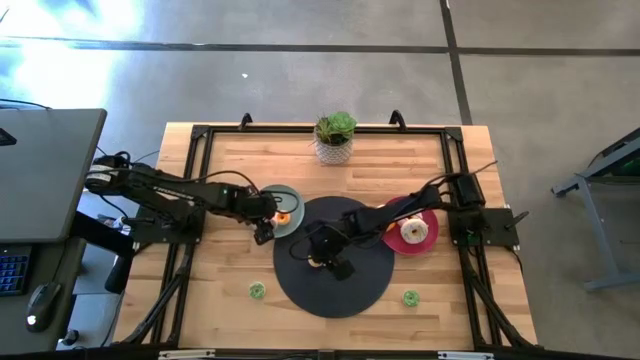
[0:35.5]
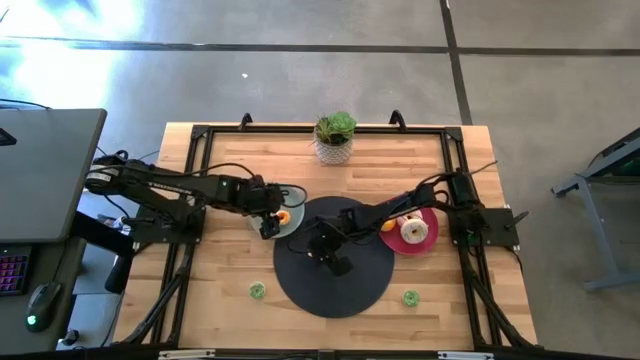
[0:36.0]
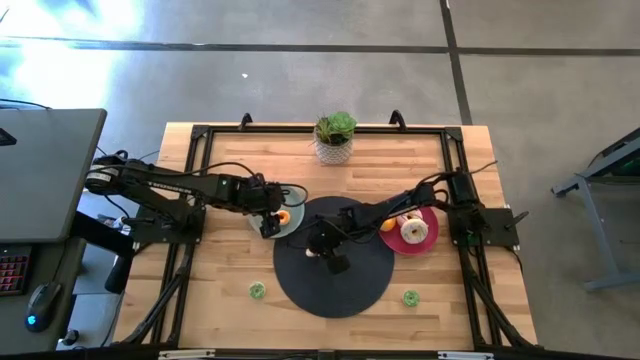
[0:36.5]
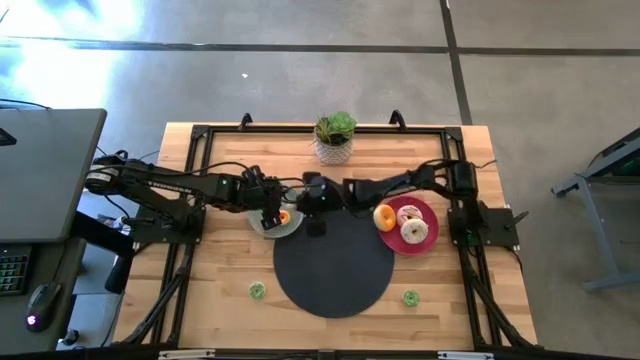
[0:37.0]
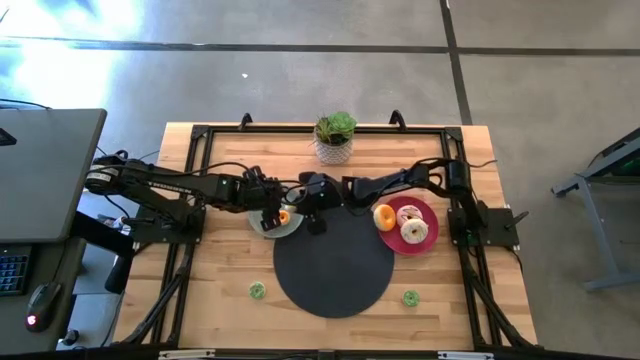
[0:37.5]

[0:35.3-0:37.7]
Task: Pick & Place donuts
Put the small yellow donut on the blue plate

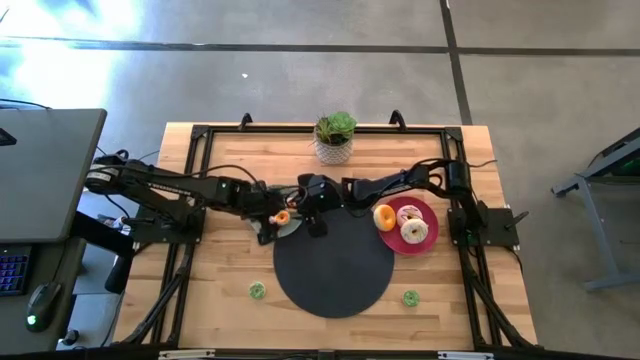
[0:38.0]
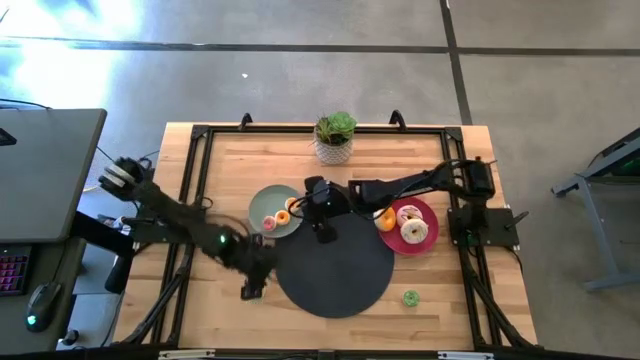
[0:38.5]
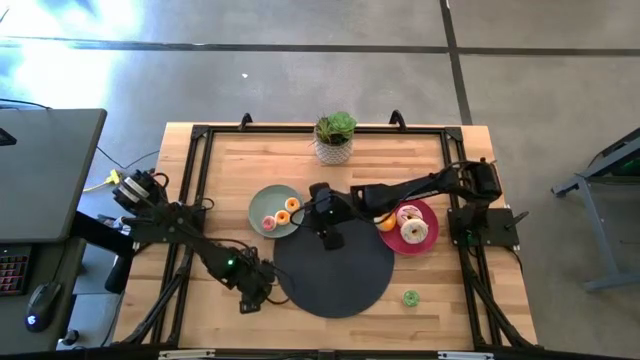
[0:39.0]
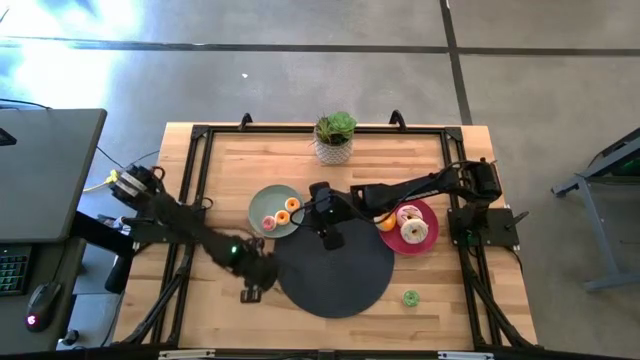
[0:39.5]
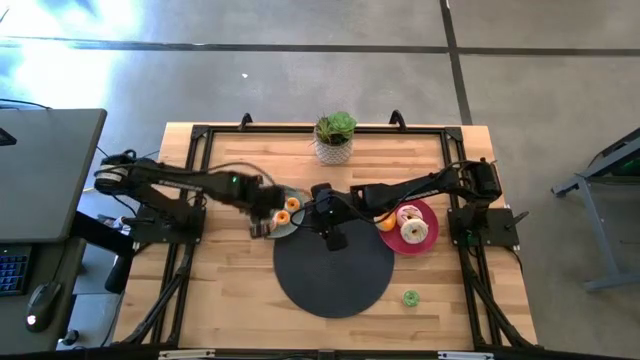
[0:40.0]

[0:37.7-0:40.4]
Put the left small green donut on the blue plate

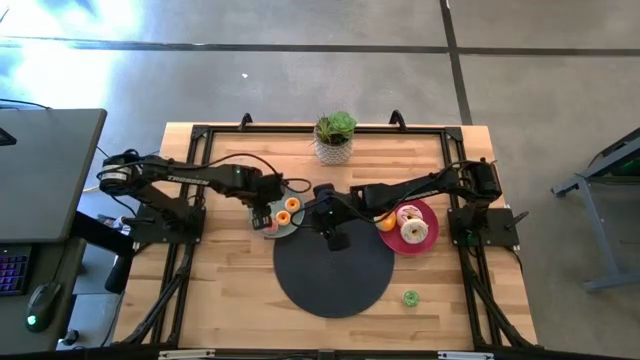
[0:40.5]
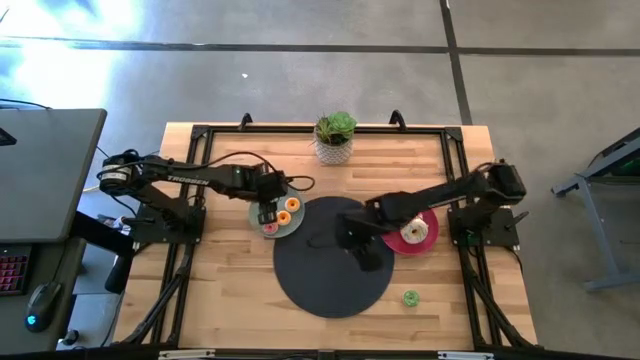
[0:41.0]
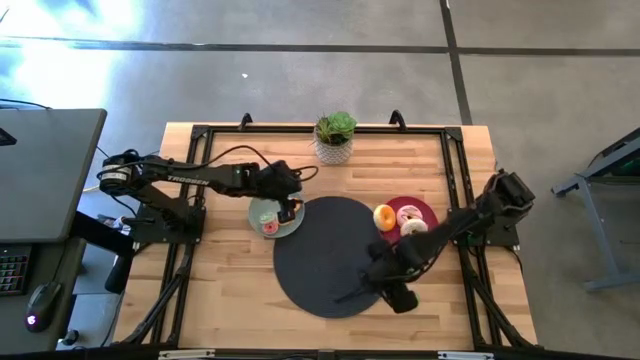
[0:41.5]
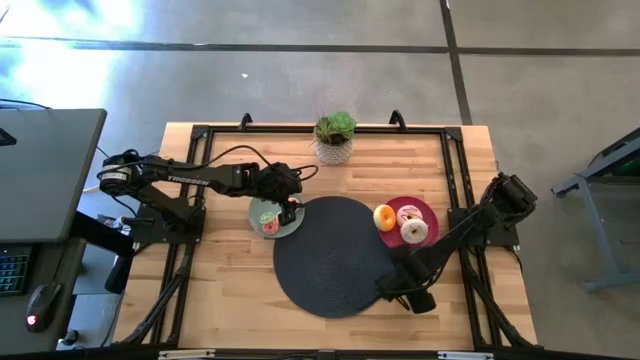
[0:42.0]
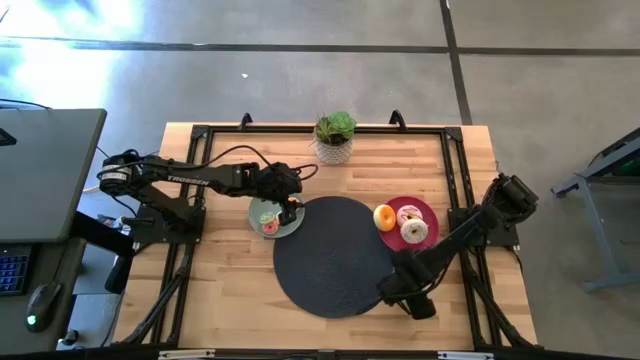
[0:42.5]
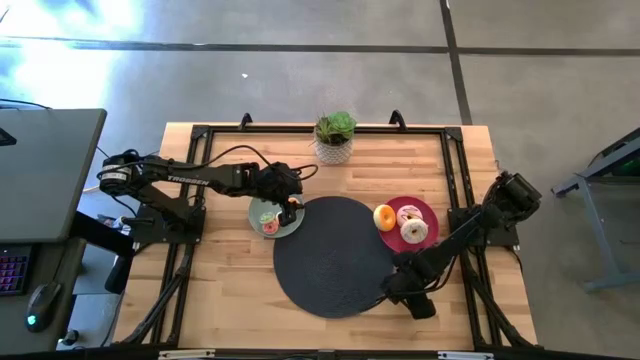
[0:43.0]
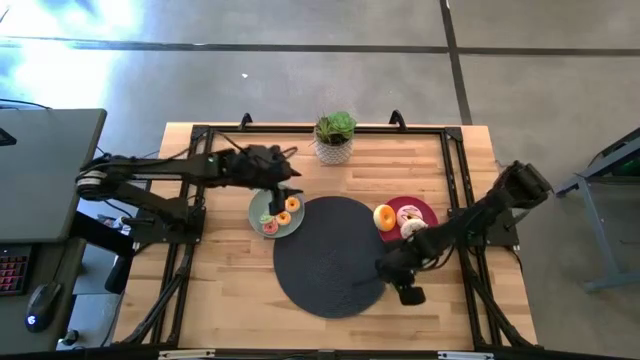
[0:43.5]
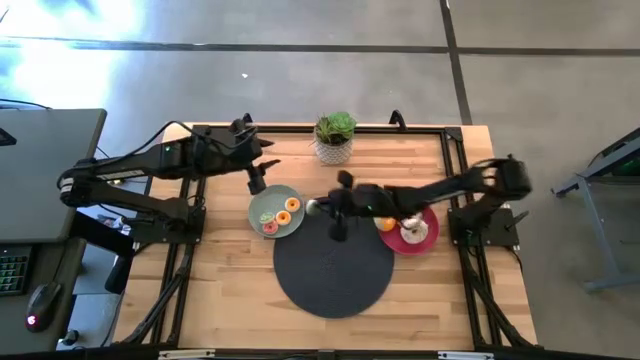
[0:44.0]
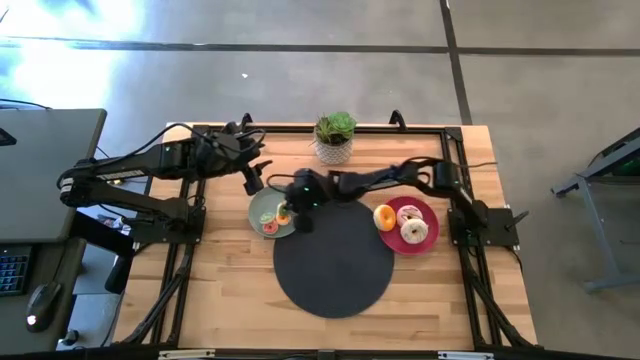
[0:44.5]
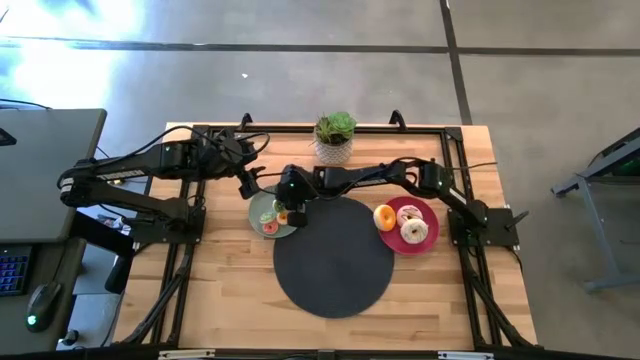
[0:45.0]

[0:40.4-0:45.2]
Put the small green donut on the blue plate

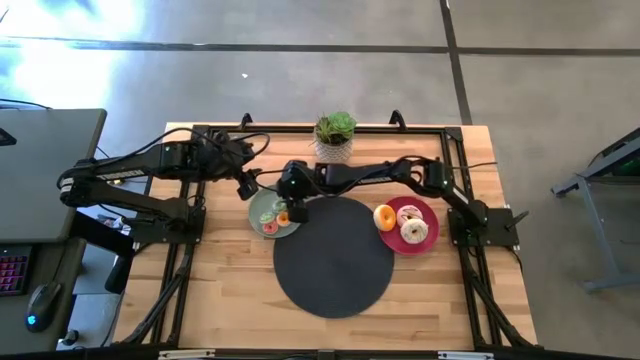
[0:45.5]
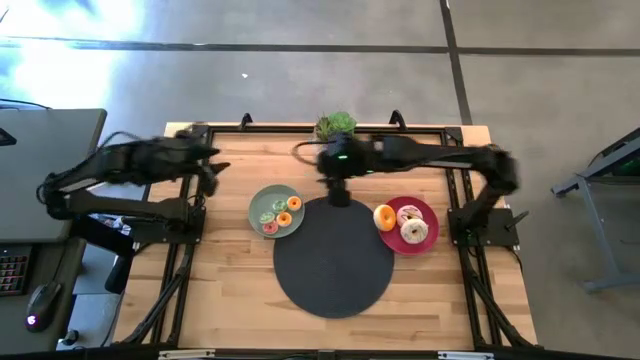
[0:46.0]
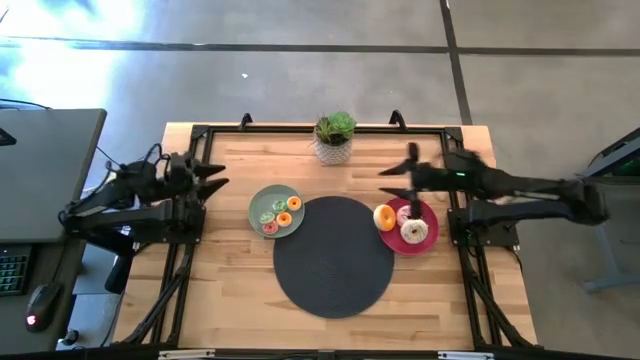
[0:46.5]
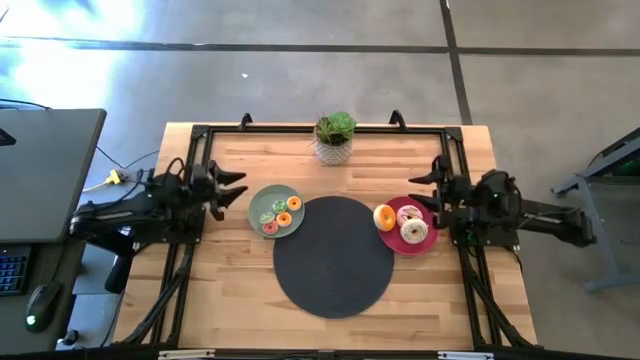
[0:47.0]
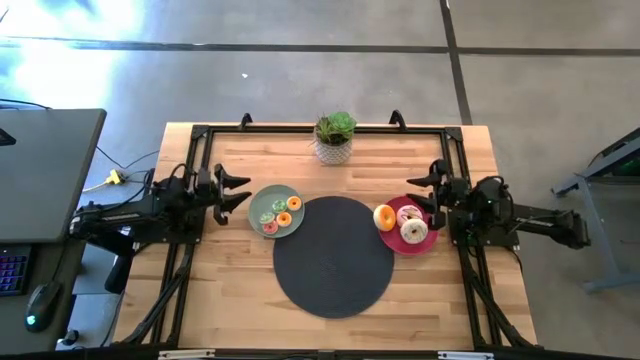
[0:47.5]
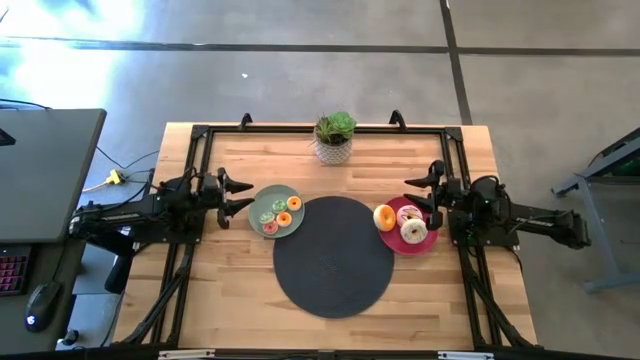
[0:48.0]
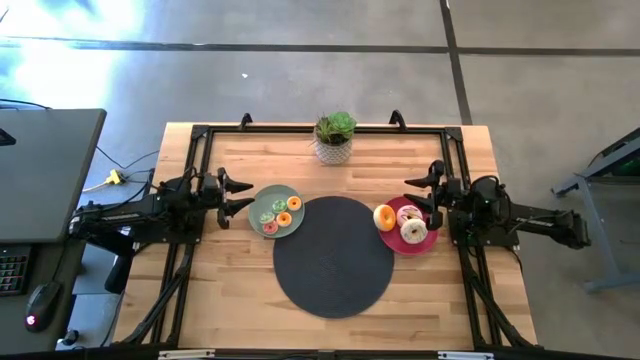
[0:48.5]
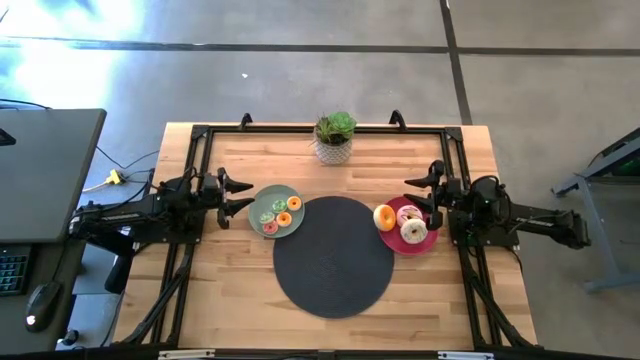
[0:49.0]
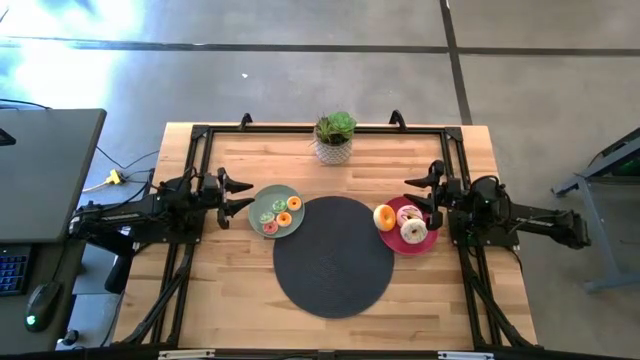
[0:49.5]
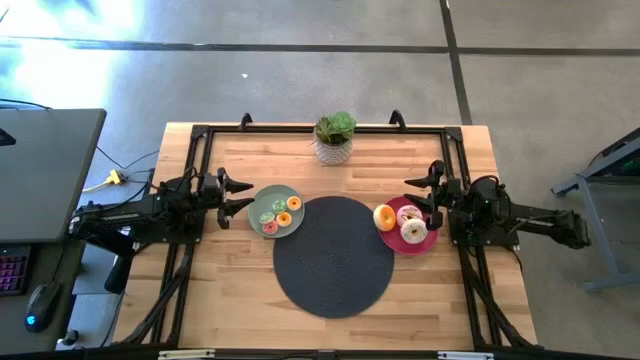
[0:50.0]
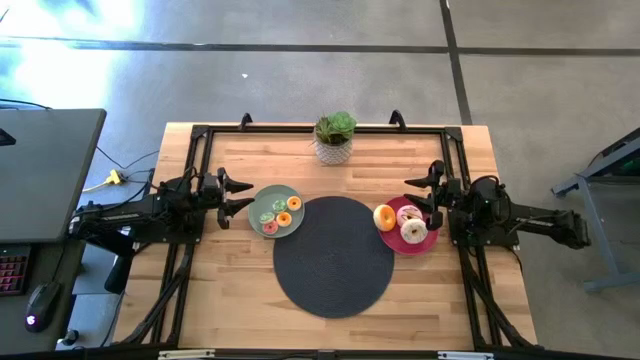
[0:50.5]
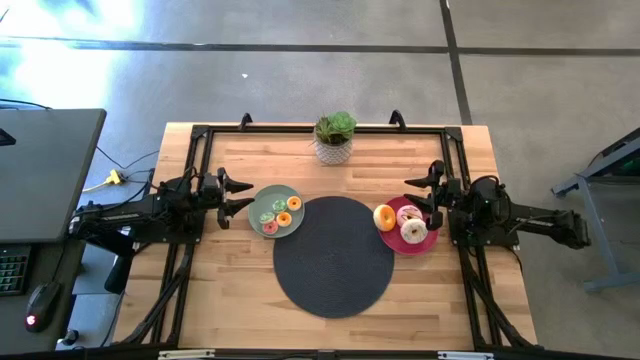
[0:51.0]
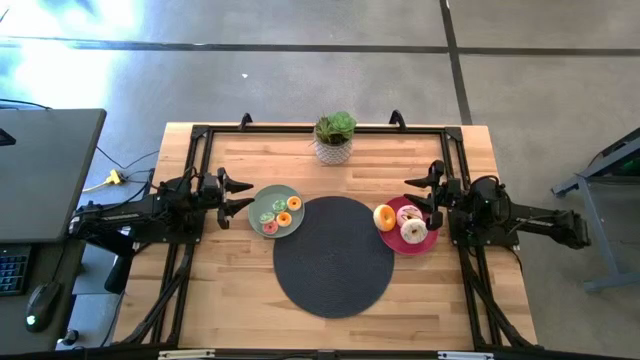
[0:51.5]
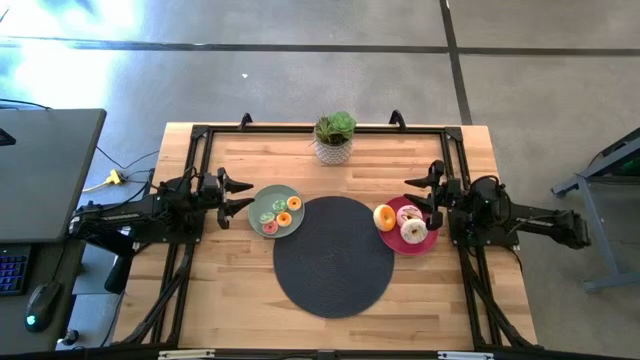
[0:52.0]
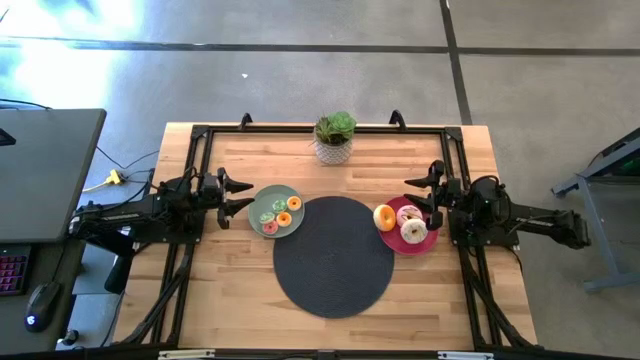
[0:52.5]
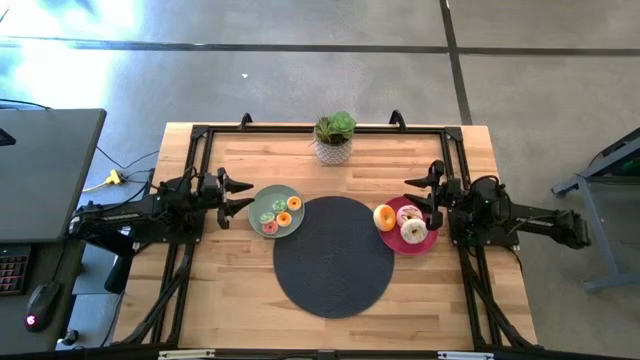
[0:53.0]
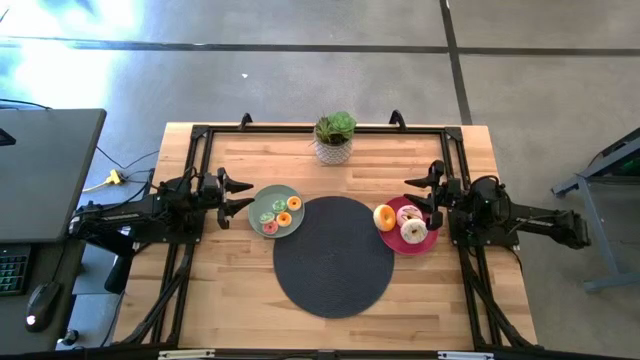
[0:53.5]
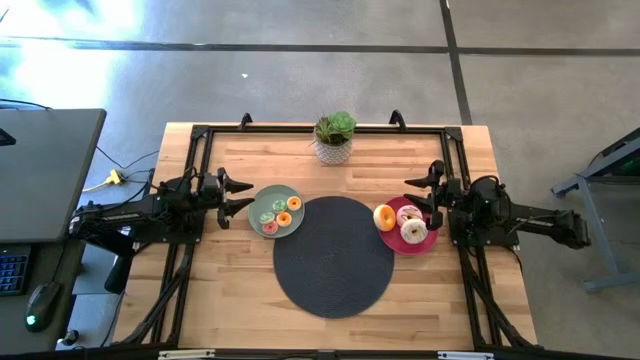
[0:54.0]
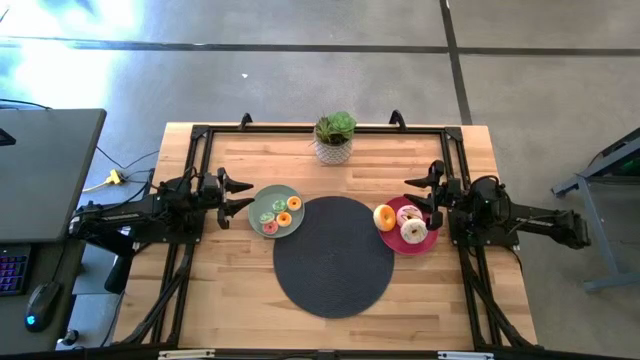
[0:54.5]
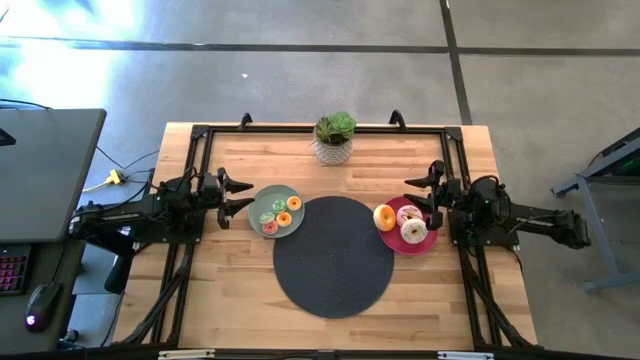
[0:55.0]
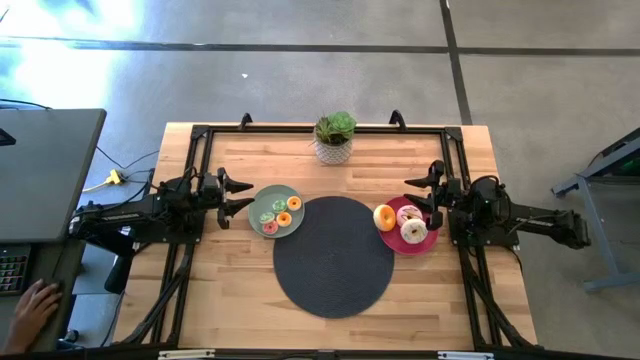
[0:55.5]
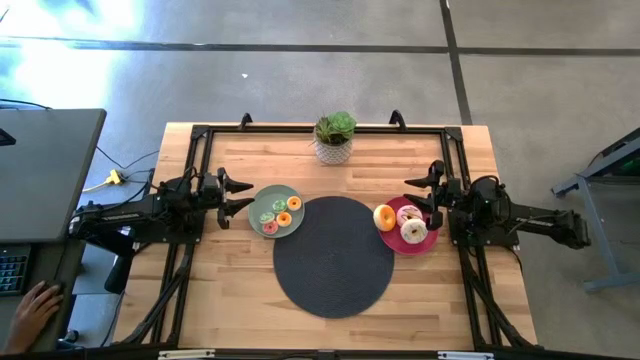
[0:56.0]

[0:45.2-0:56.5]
Return to Home Position
